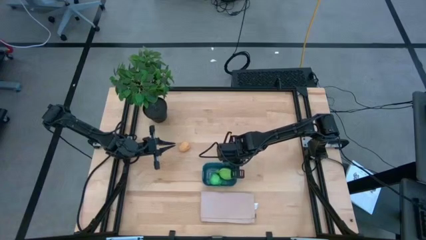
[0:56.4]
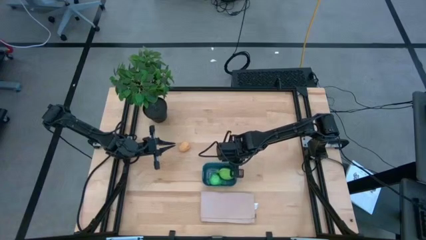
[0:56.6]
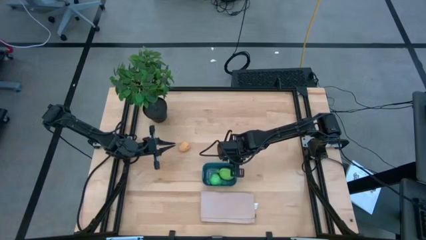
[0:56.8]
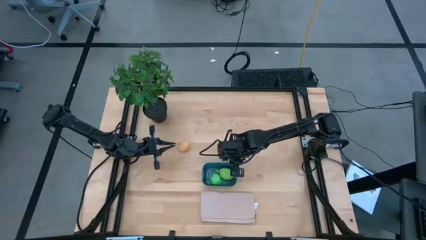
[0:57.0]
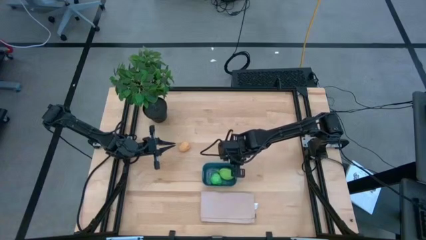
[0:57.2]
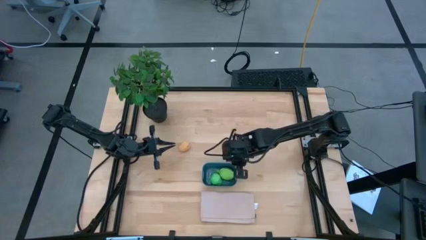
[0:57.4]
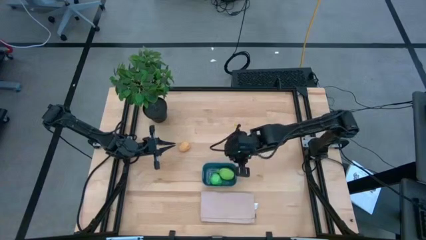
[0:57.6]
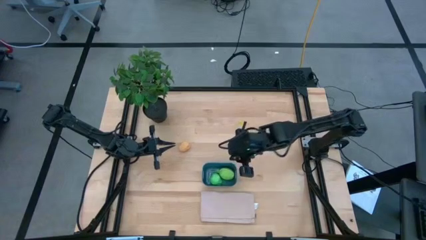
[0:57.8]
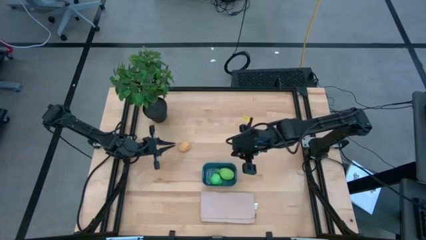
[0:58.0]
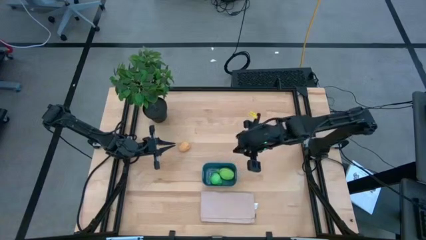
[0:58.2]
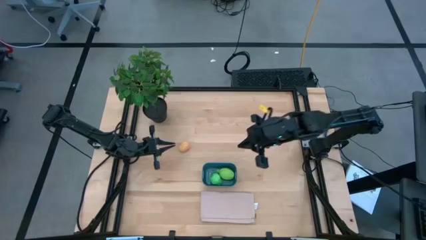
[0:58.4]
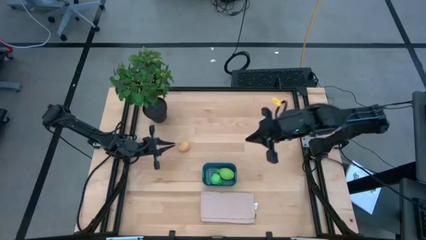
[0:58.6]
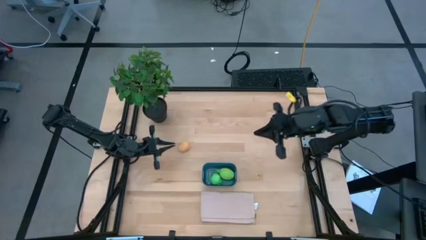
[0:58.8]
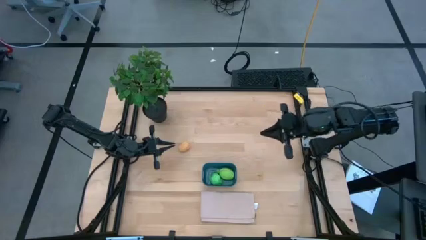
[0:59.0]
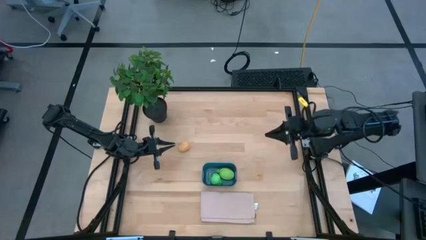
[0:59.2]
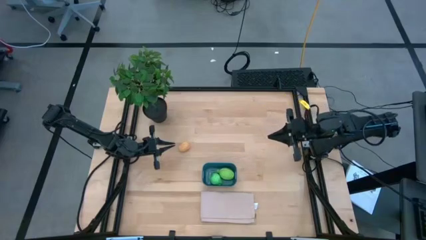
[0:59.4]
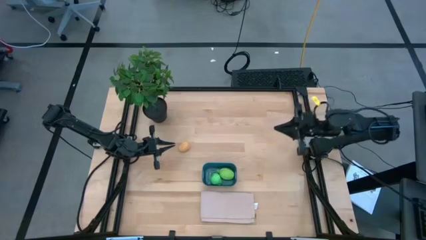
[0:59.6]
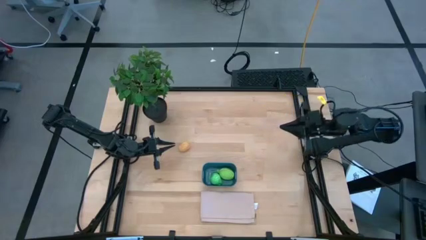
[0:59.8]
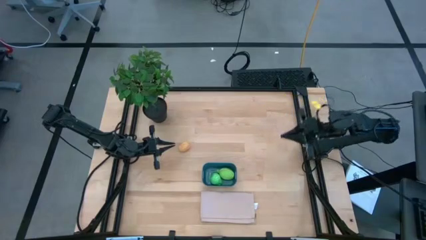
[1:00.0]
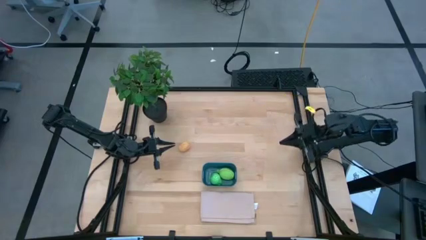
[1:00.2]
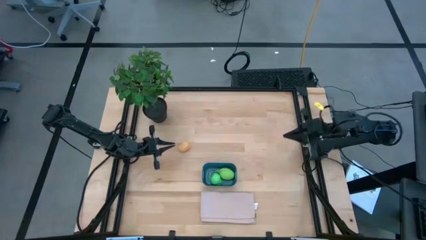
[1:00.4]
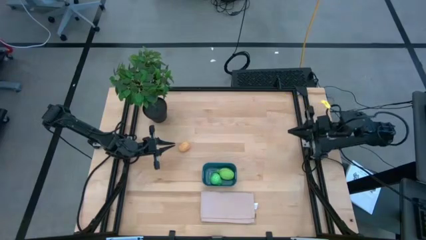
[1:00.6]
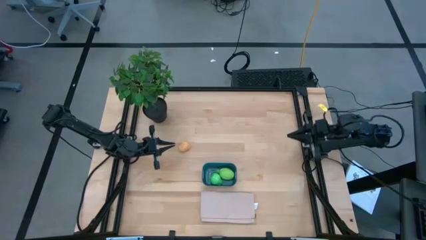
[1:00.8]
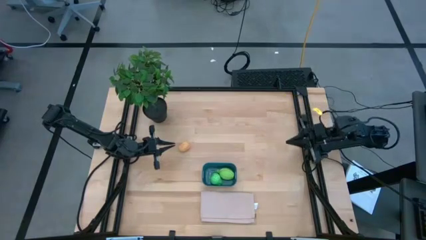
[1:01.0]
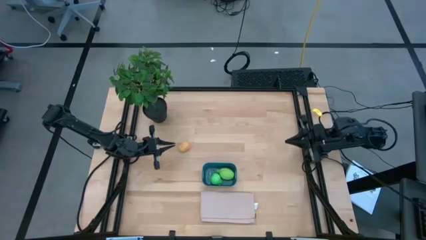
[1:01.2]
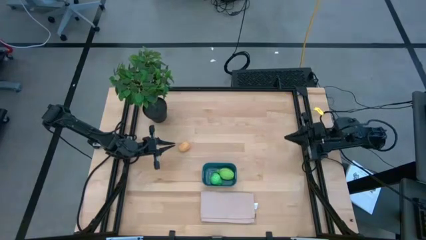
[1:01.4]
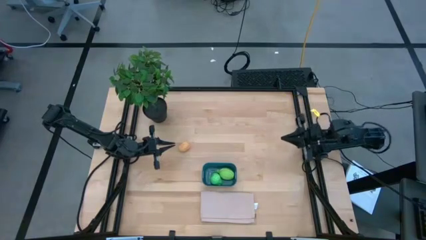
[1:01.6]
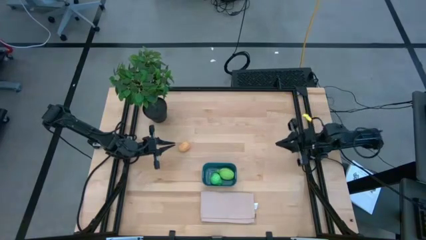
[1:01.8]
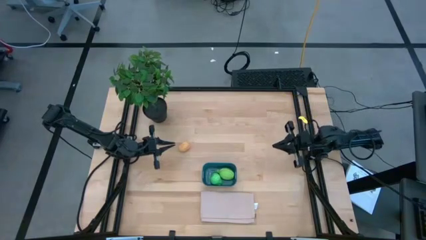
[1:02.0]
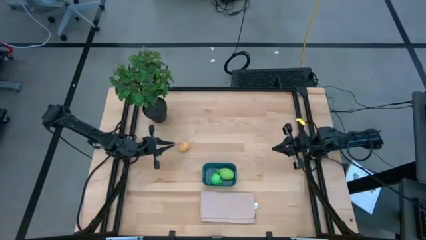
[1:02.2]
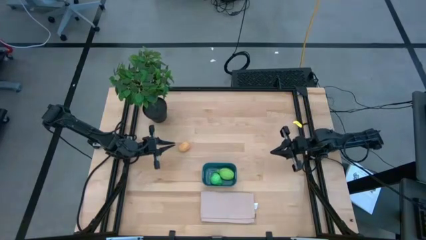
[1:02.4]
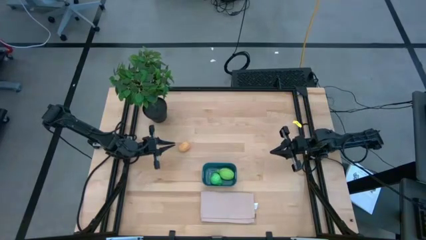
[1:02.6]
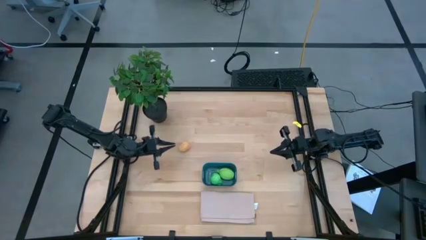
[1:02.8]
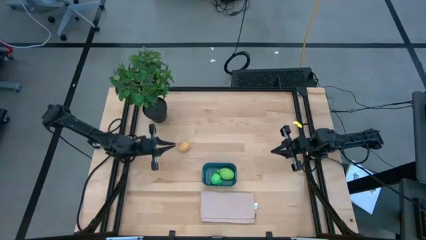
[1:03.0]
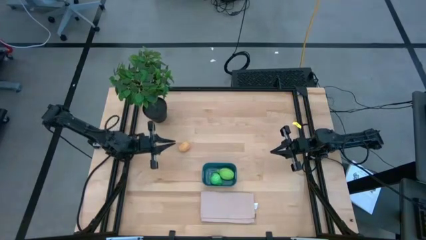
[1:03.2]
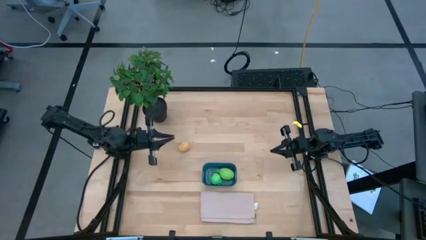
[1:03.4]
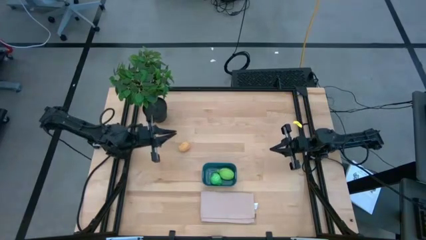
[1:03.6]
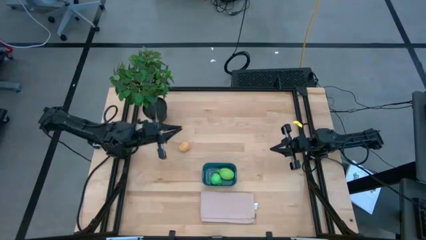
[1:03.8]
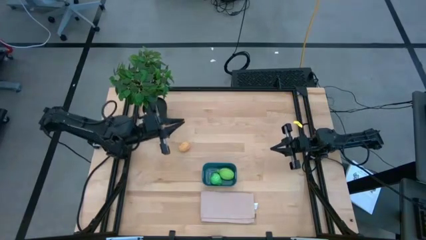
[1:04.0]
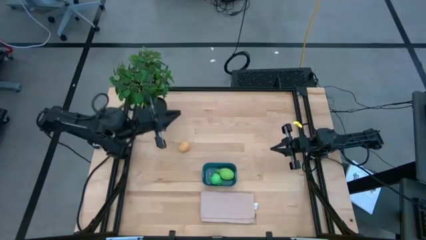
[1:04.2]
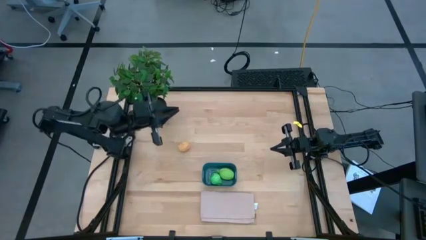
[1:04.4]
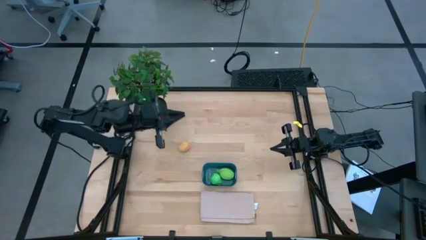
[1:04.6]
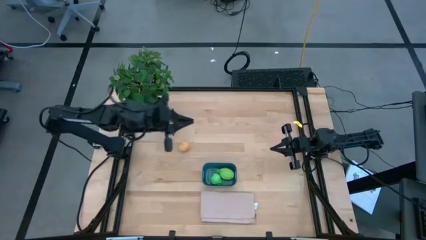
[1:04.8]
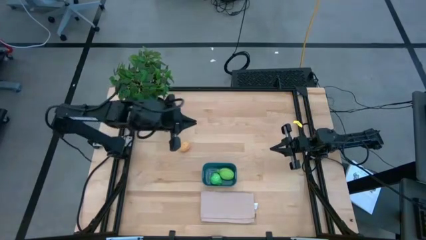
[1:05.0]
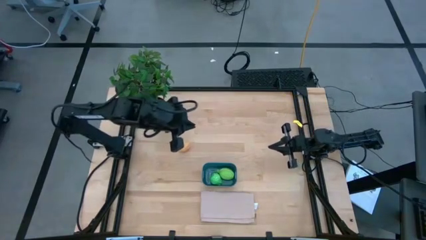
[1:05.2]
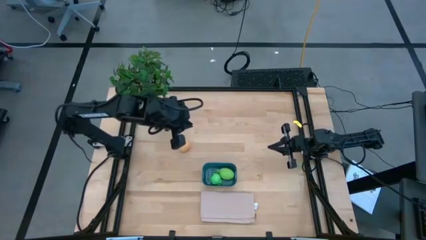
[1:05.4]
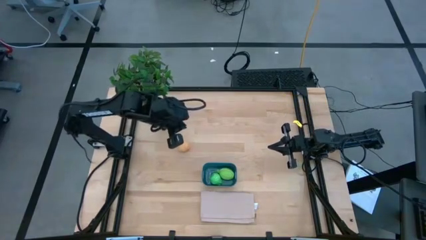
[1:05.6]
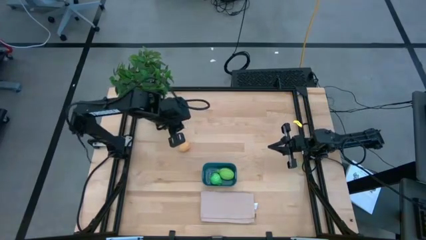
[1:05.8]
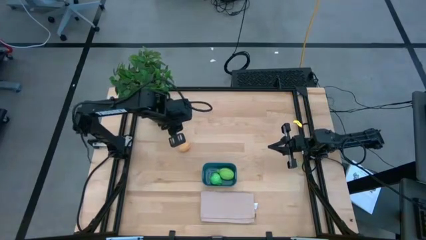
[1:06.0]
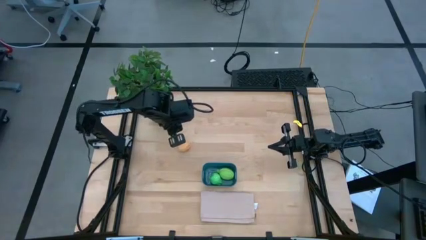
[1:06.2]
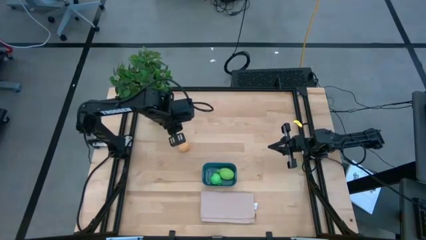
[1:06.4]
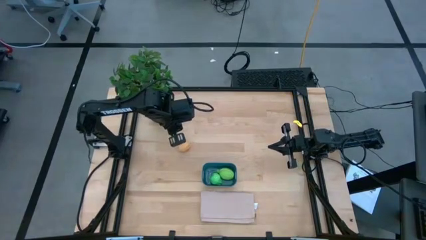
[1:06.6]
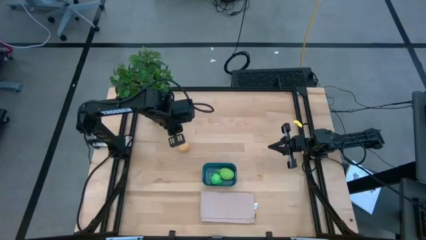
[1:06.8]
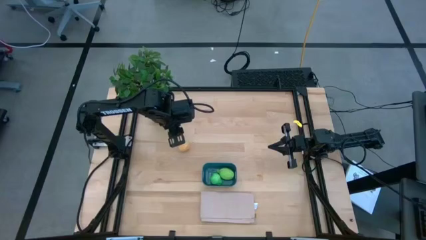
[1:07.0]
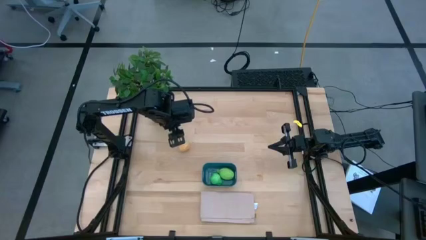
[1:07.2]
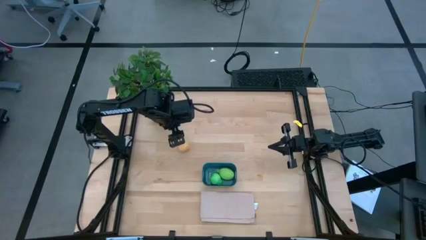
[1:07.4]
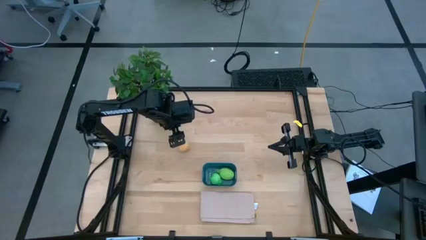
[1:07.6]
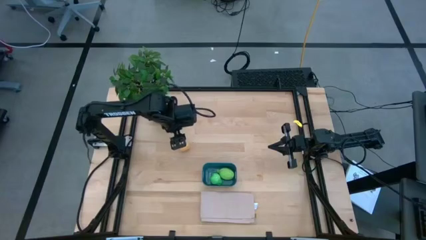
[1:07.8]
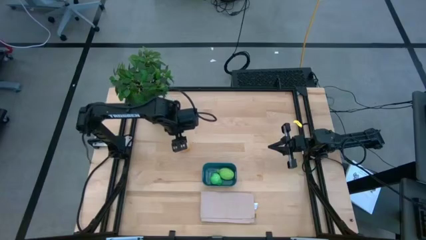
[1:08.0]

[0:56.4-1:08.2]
Task: Pick and placing Produce into tupperware
Put the brown potato into the blue bin

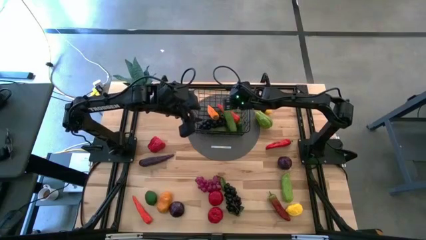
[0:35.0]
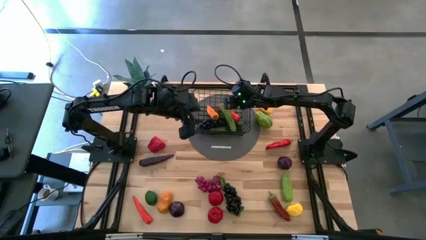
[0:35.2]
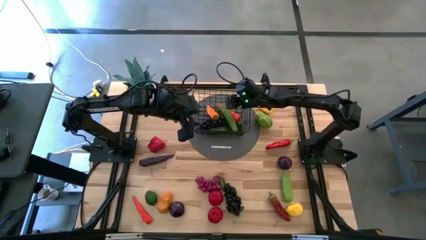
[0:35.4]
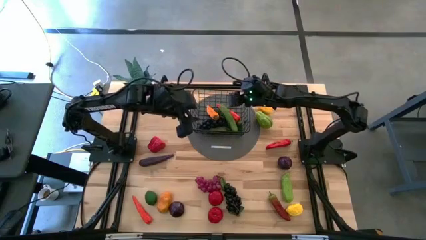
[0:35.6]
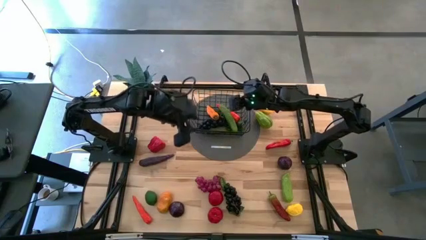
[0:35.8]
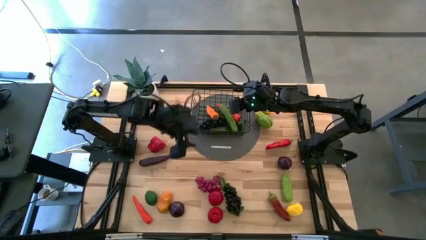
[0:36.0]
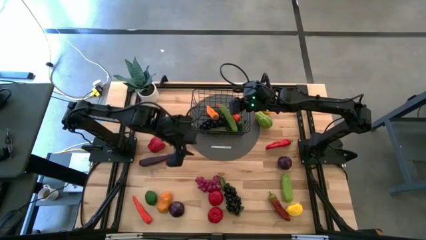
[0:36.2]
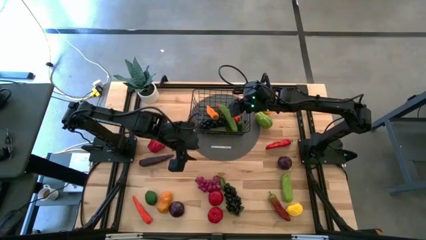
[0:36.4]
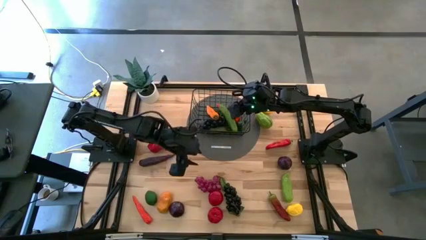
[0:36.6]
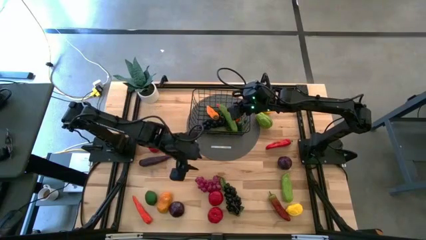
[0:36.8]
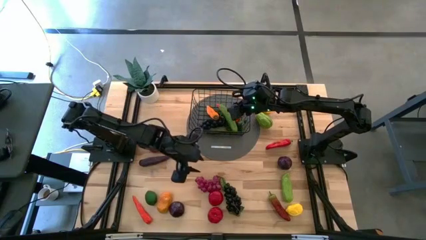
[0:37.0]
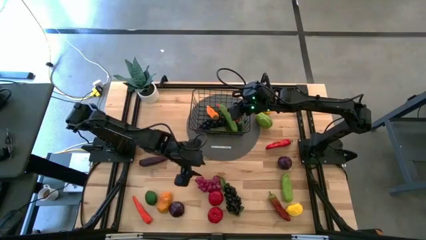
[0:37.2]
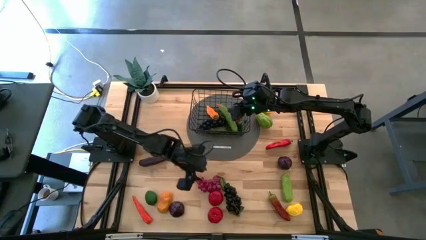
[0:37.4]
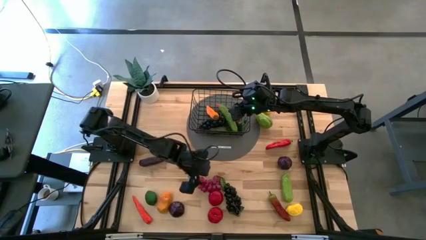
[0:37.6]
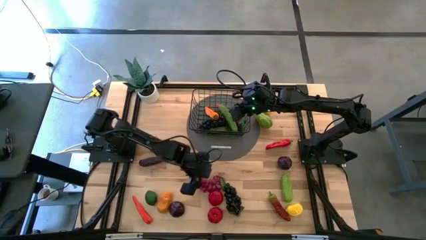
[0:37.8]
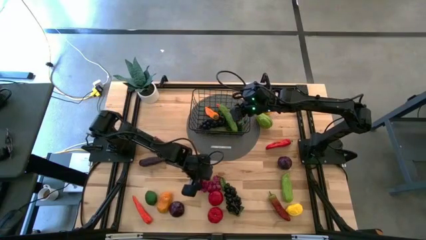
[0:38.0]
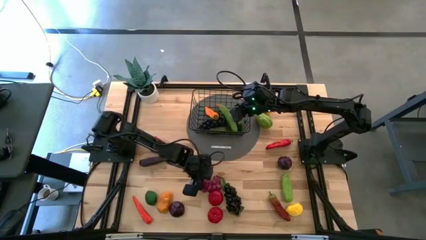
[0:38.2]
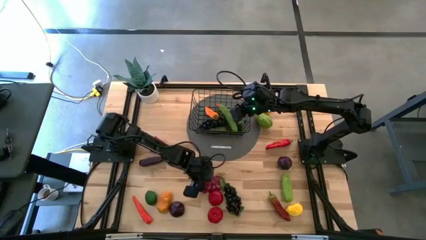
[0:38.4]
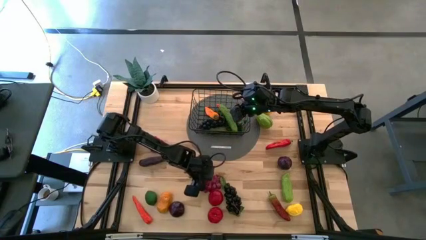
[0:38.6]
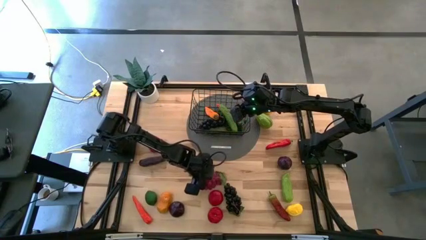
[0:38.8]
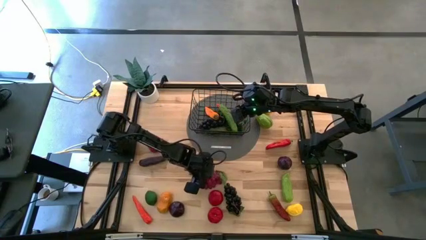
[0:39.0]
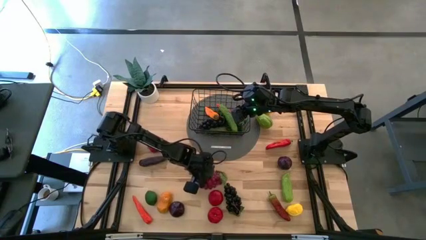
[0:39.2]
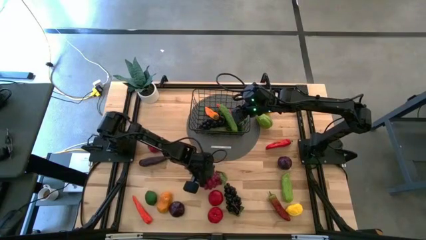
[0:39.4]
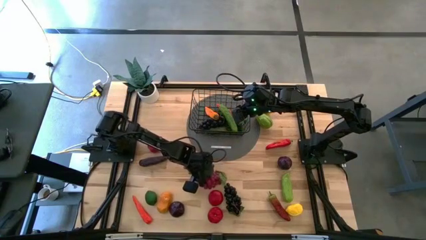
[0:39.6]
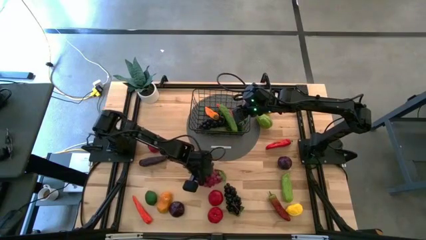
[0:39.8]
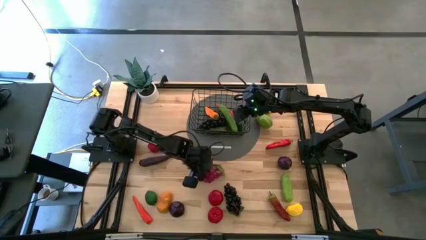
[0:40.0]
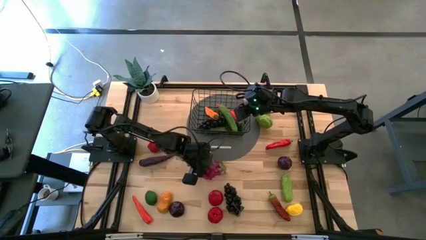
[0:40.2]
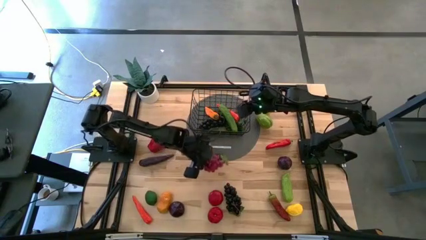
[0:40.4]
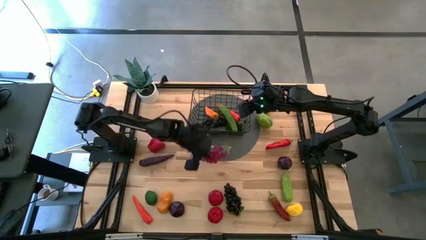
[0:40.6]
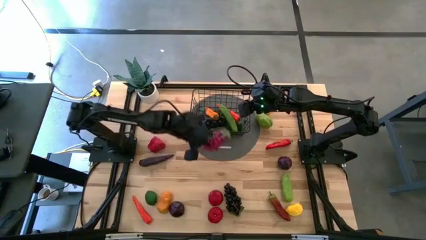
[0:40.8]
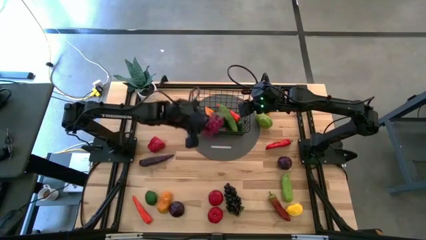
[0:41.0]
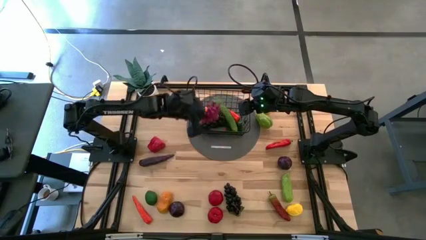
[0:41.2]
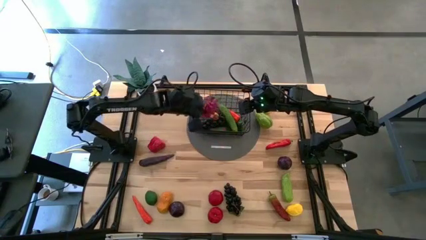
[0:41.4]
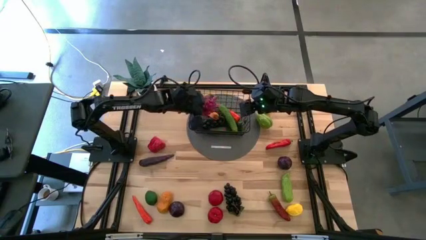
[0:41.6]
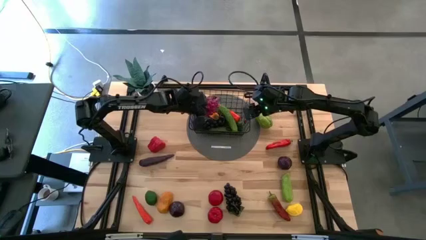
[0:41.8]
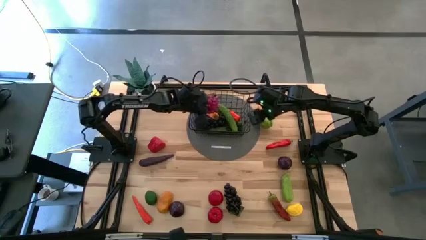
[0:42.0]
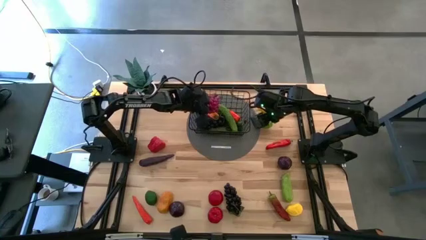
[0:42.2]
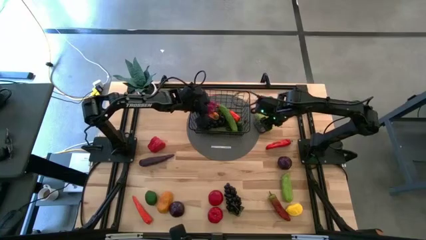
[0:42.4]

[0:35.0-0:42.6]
Task: Build produce basket
Put the red grapes into the wire basket
